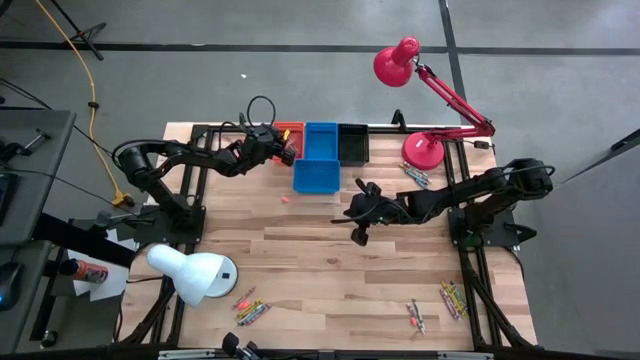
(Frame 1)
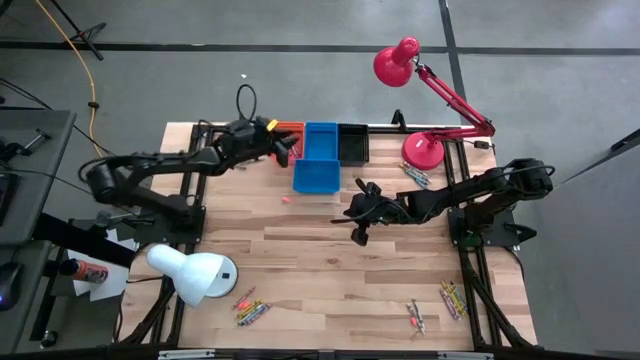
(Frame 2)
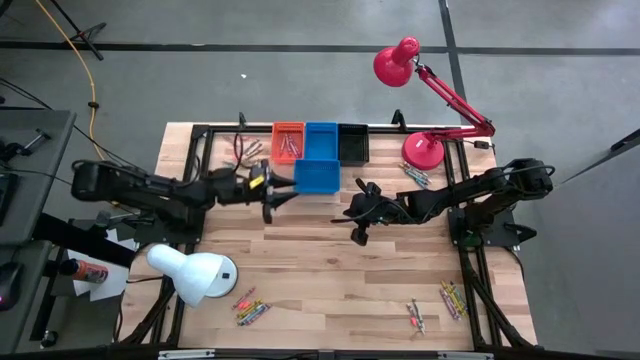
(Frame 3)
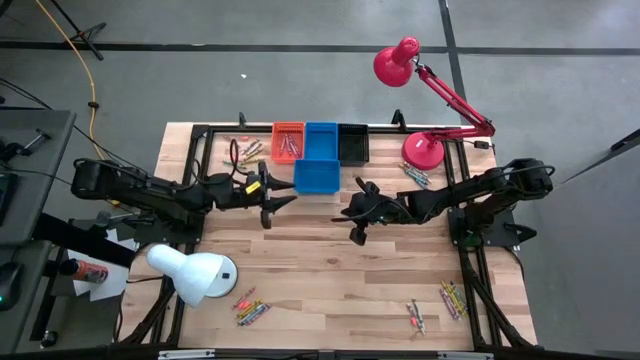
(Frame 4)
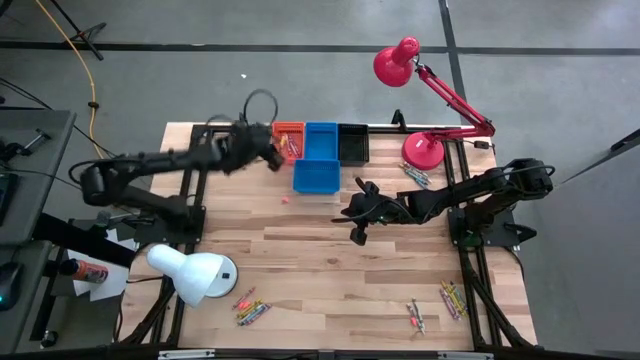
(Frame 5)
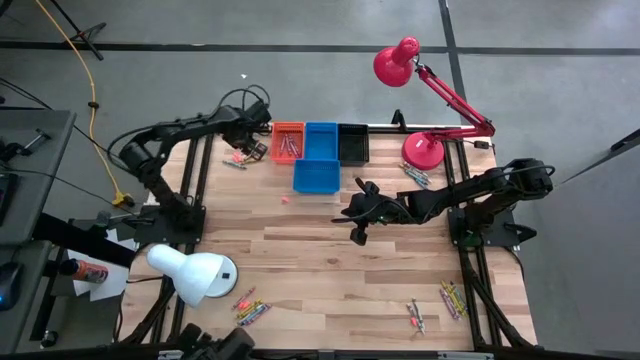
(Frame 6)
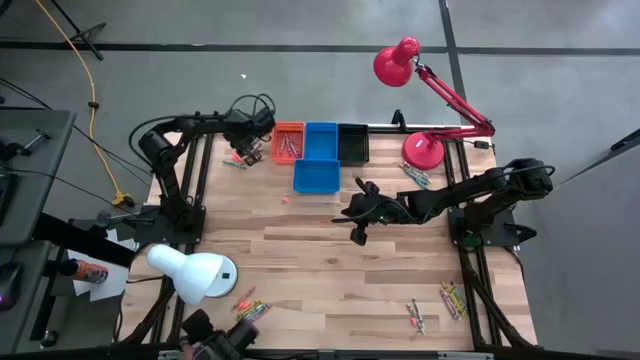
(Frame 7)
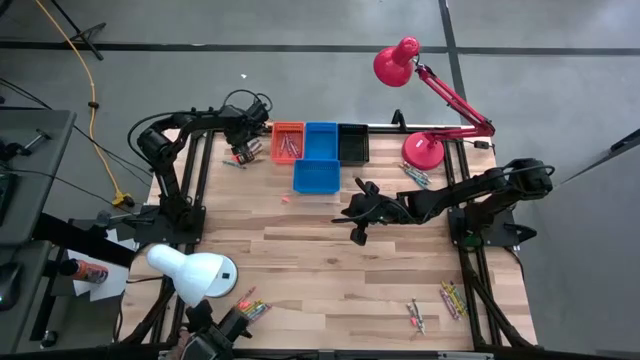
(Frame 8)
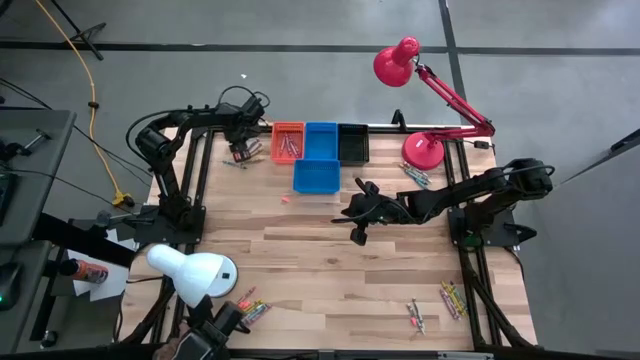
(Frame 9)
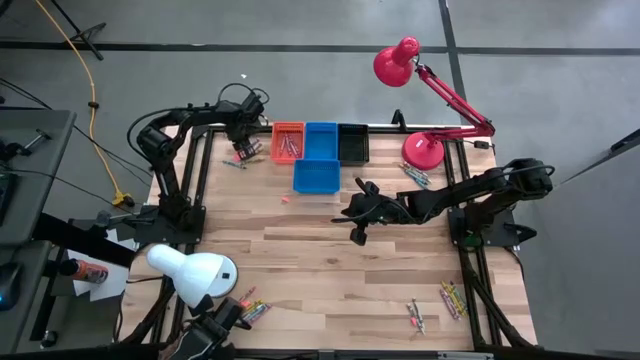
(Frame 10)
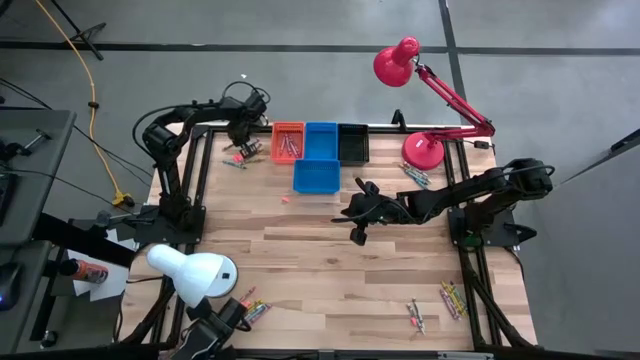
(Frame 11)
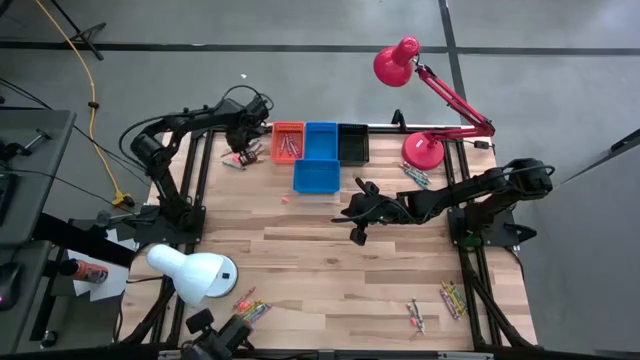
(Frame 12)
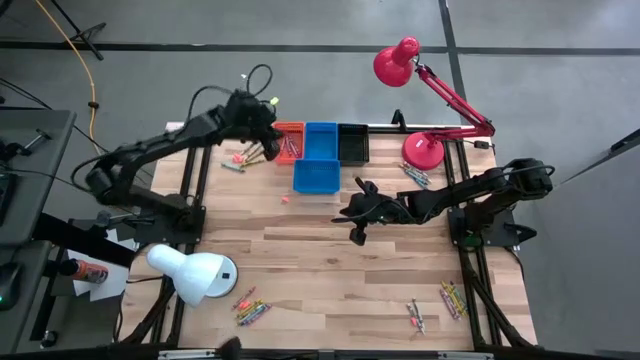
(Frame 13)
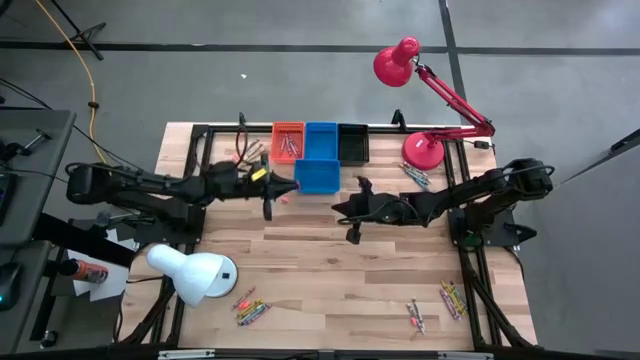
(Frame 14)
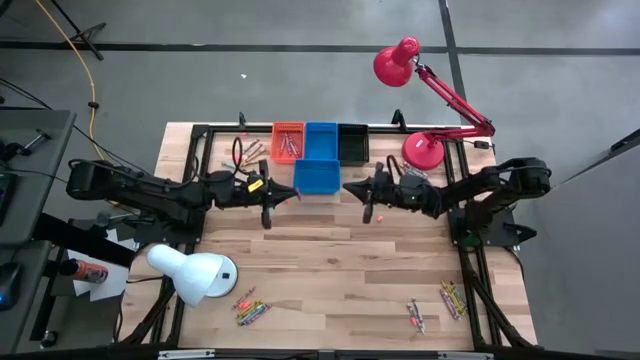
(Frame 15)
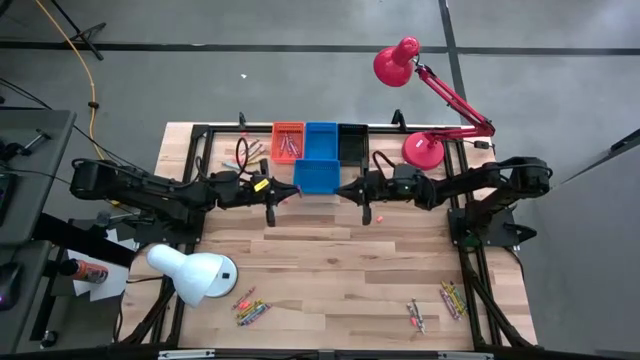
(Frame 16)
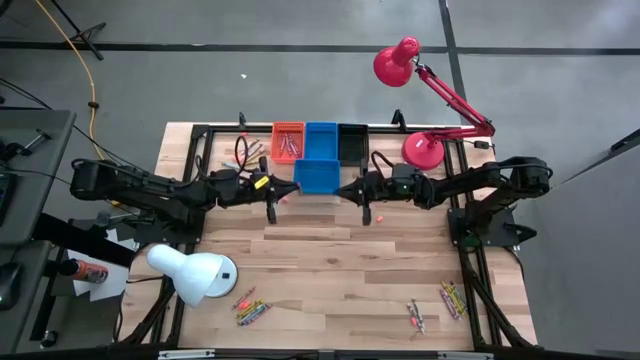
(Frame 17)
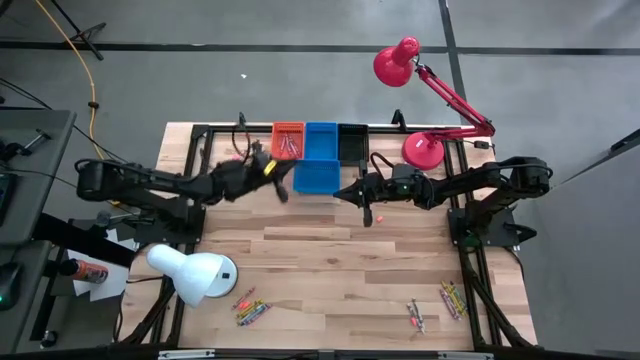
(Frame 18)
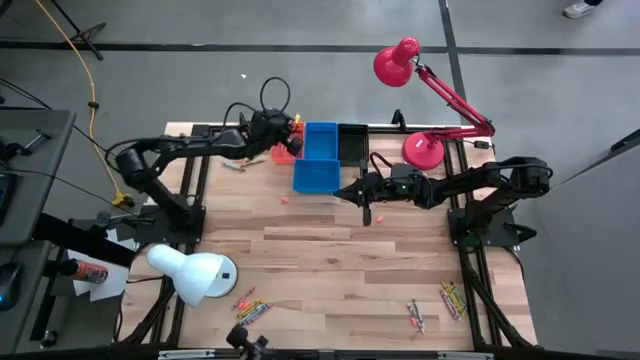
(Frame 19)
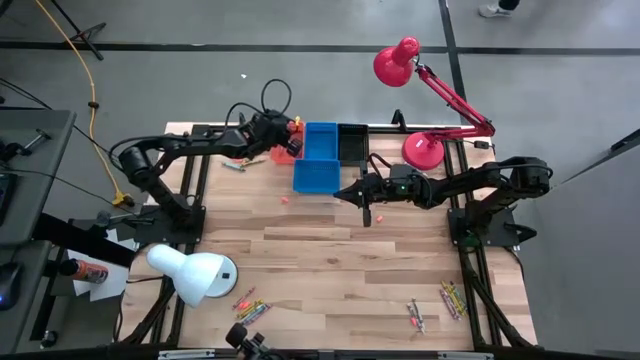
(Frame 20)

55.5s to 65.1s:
Task: Sort crayons
Put the pink crayon into the orange bin

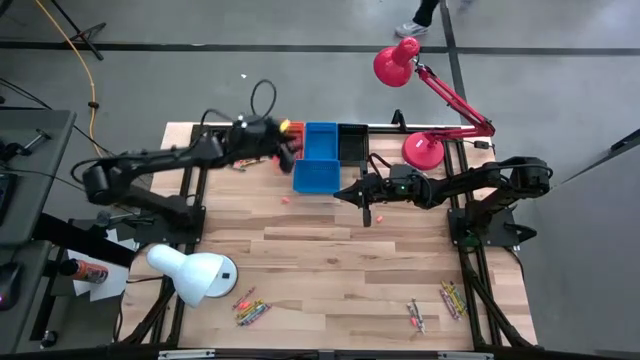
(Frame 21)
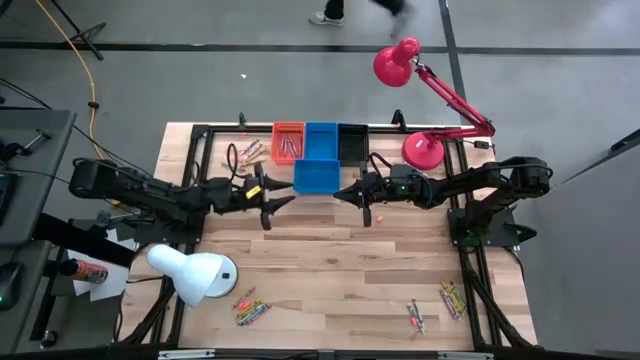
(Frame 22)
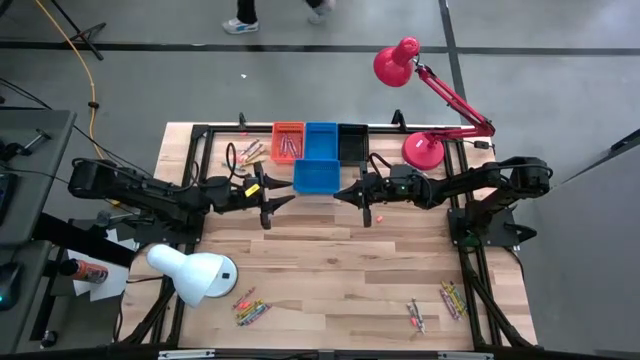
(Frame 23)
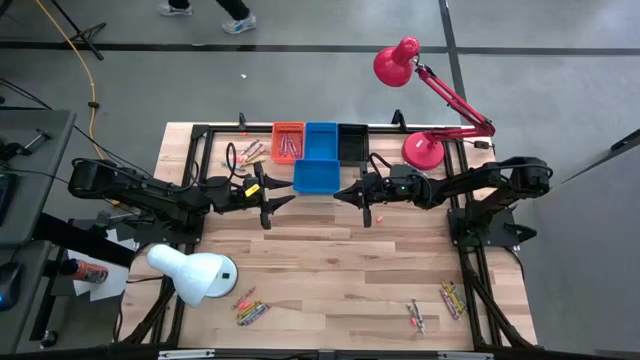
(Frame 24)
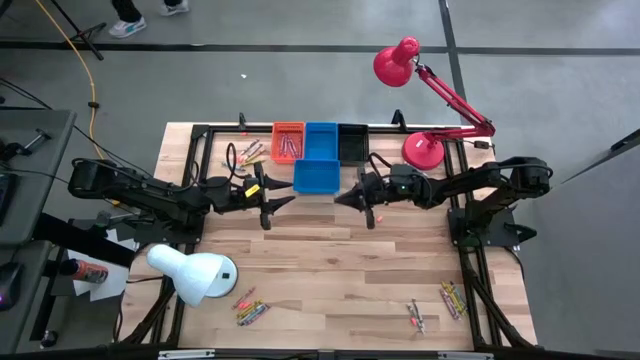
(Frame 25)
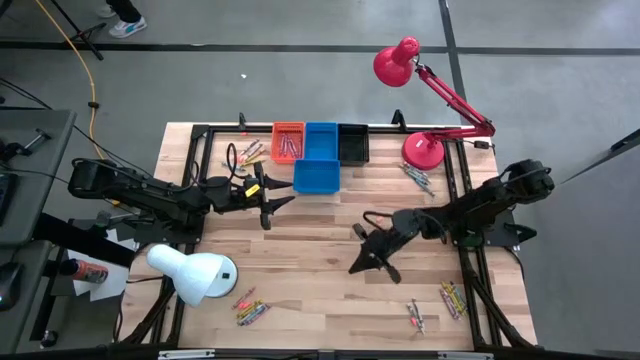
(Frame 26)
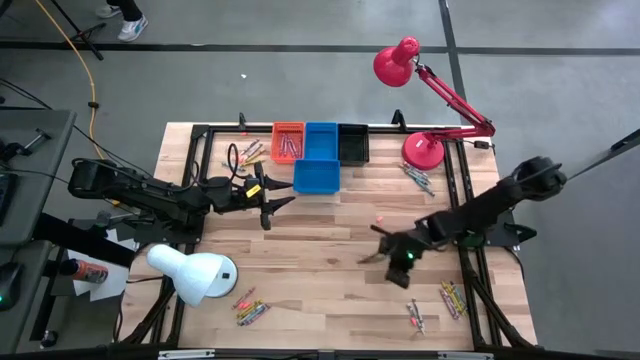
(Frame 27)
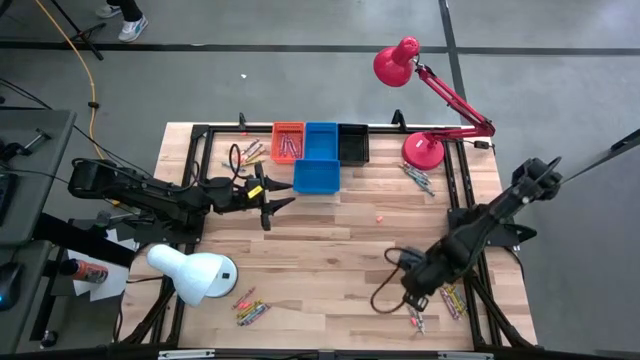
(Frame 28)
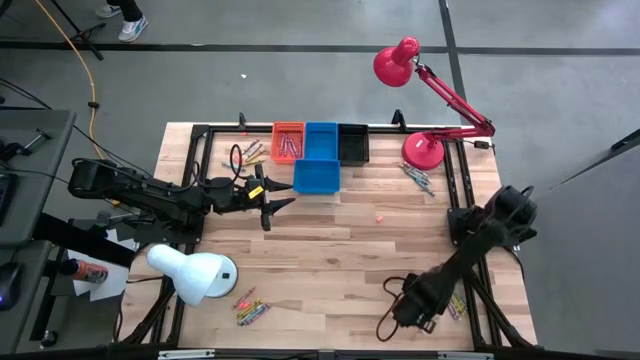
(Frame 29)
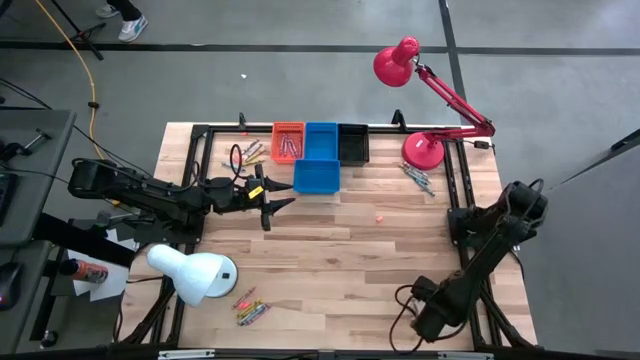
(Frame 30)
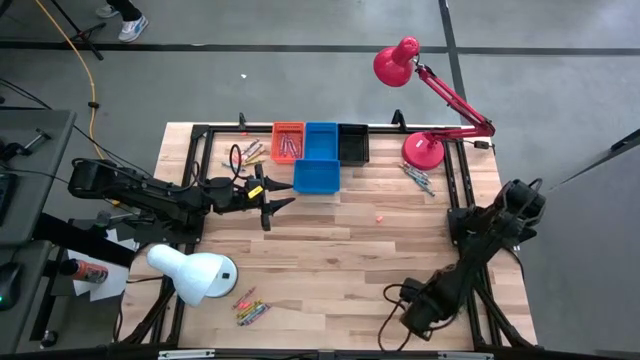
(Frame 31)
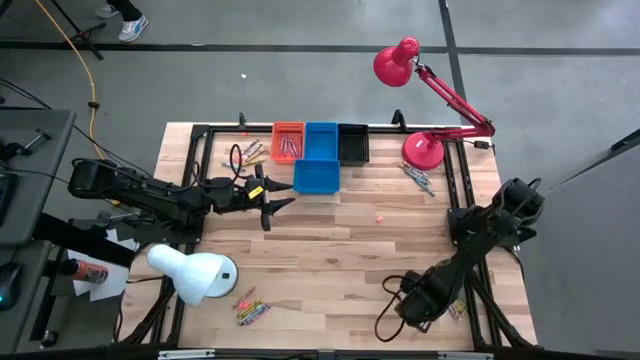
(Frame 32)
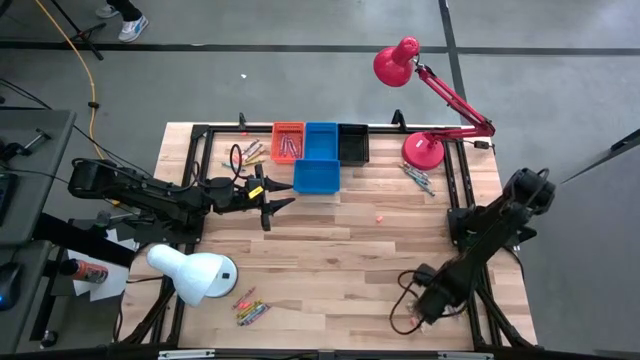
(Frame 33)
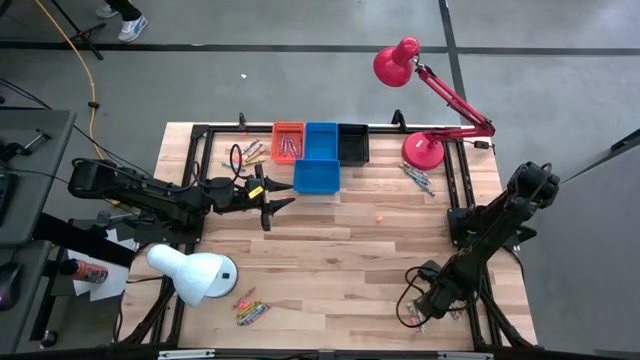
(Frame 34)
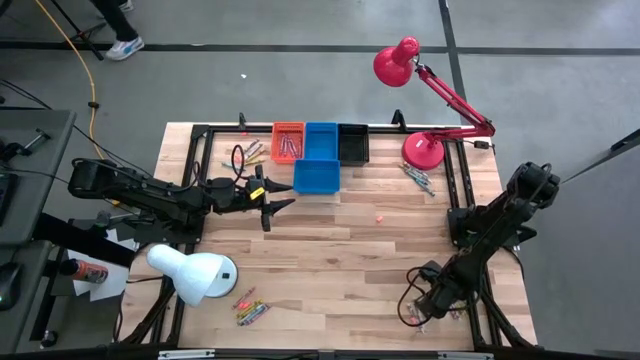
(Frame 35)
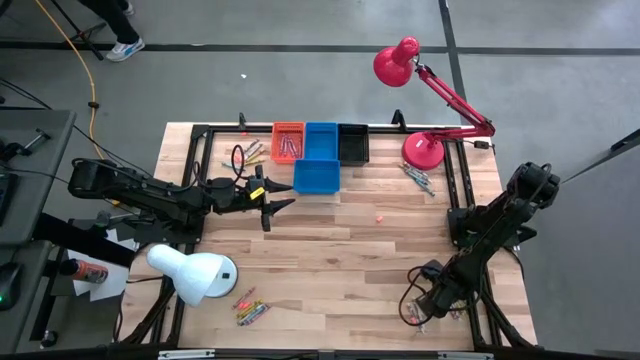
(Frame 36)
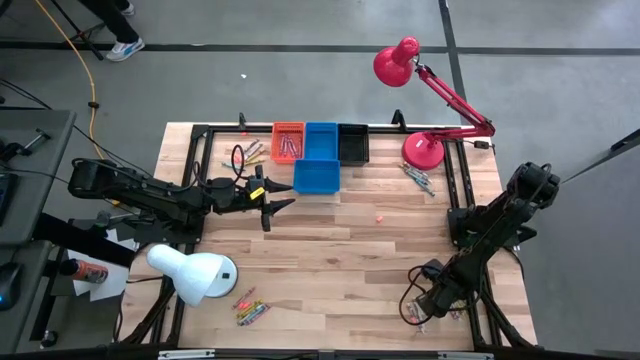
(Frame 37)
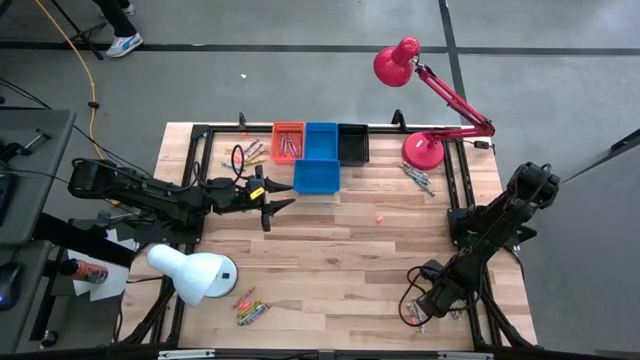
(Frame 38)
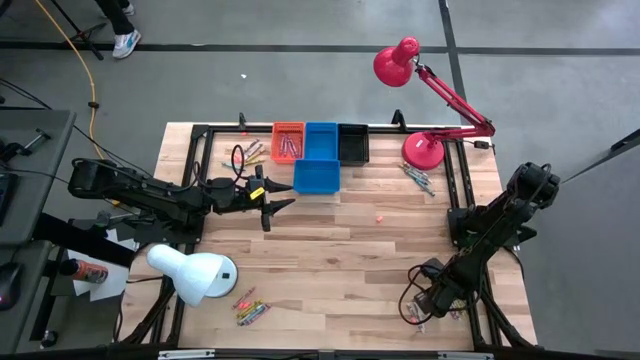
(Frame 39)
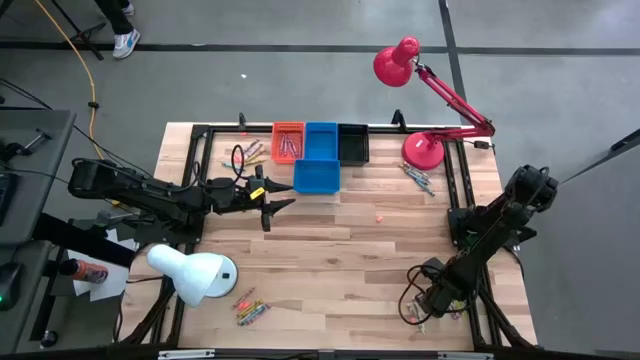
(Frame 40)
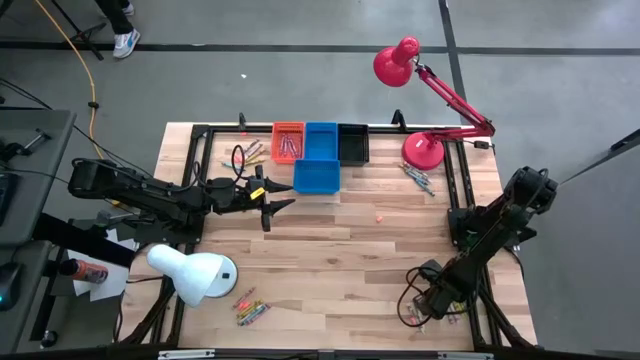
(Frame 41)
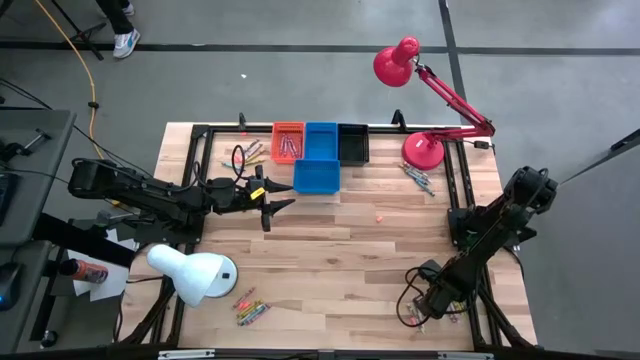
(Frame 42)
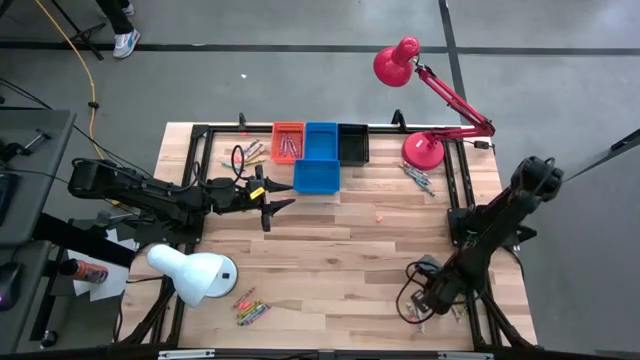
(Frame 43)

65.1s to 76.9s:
Put the pink crayon into the orange bin
